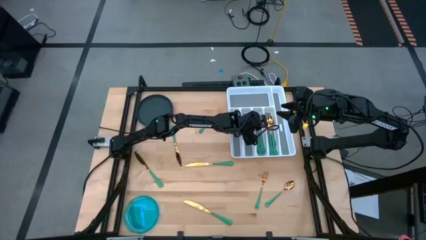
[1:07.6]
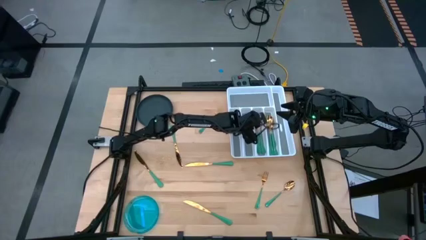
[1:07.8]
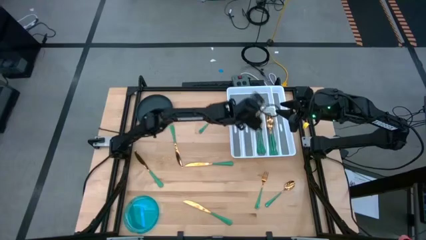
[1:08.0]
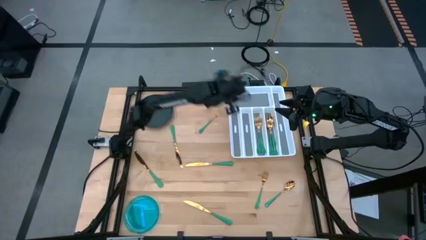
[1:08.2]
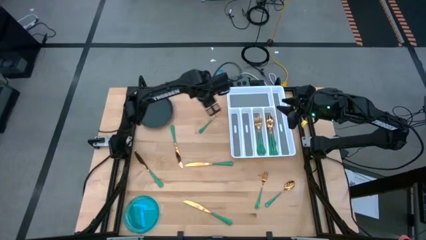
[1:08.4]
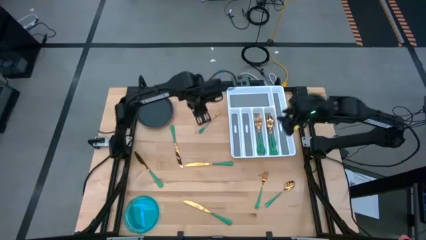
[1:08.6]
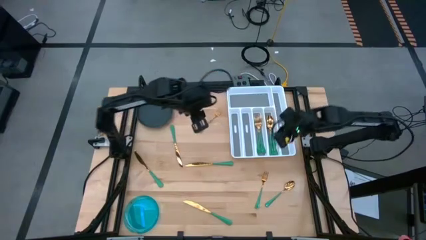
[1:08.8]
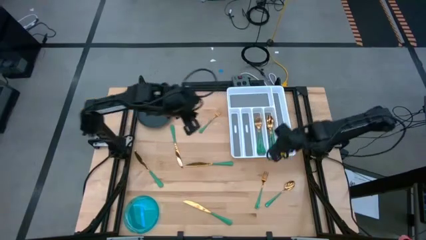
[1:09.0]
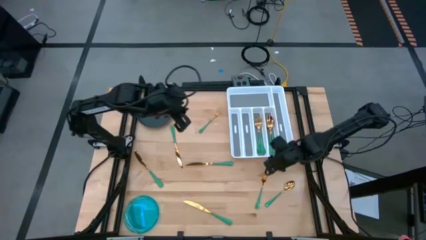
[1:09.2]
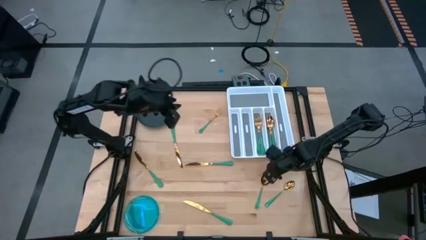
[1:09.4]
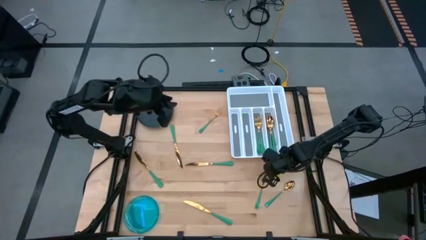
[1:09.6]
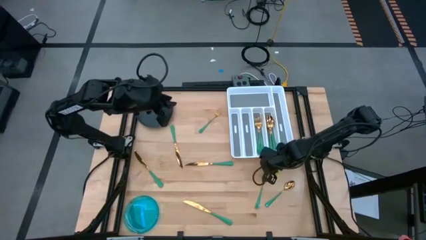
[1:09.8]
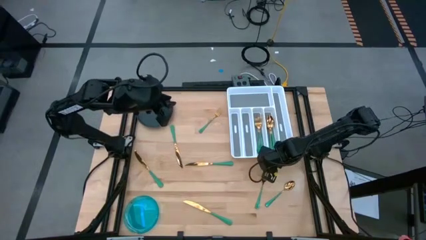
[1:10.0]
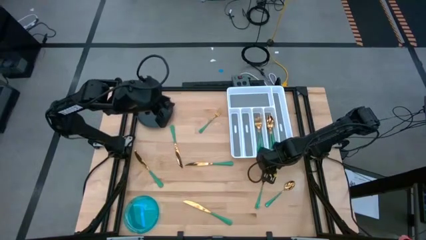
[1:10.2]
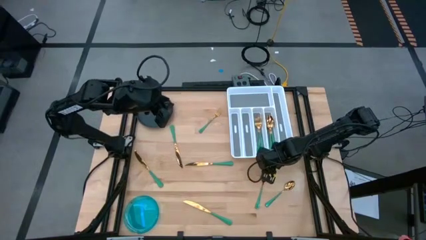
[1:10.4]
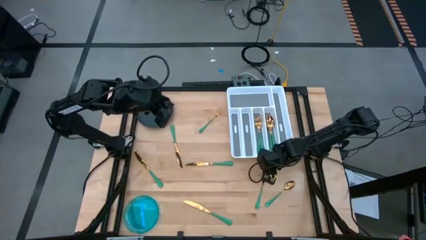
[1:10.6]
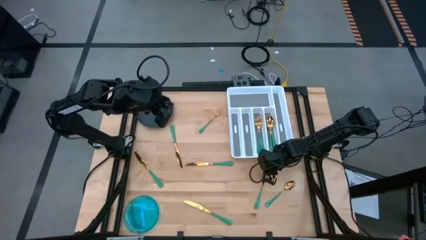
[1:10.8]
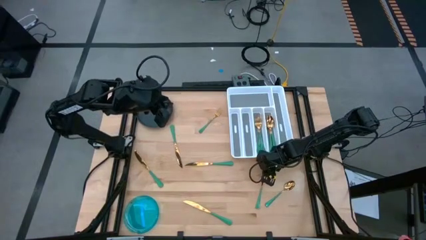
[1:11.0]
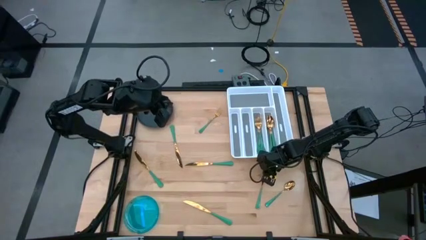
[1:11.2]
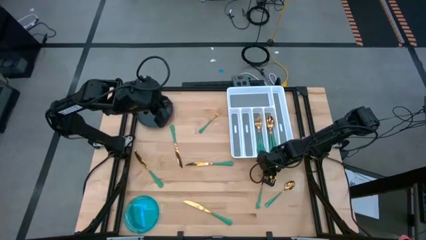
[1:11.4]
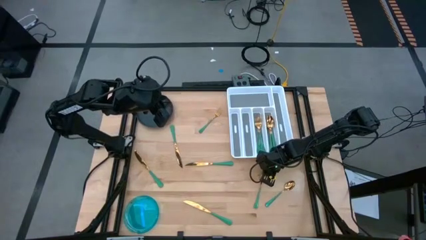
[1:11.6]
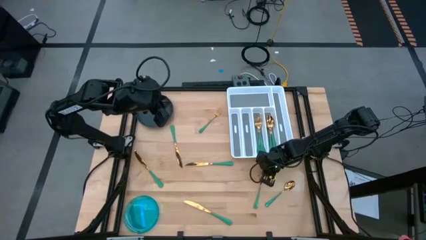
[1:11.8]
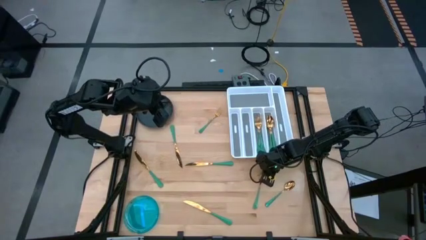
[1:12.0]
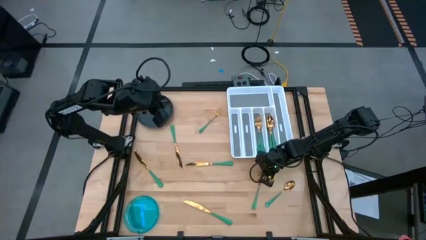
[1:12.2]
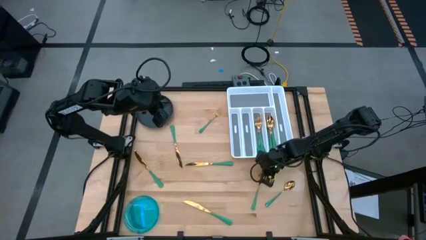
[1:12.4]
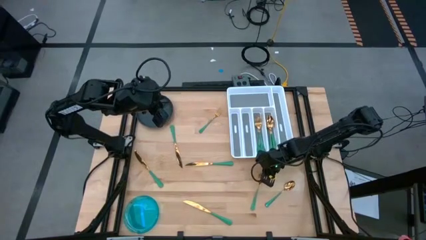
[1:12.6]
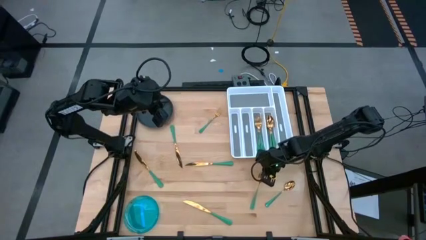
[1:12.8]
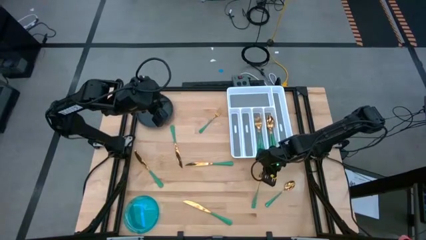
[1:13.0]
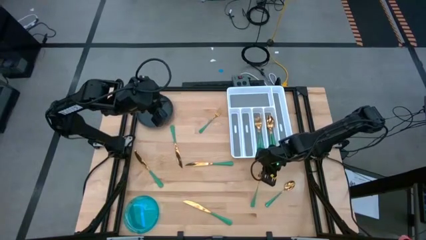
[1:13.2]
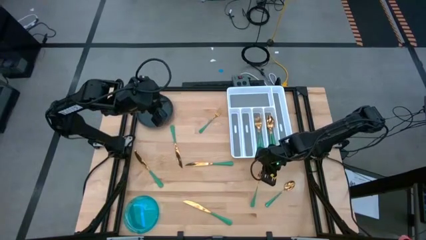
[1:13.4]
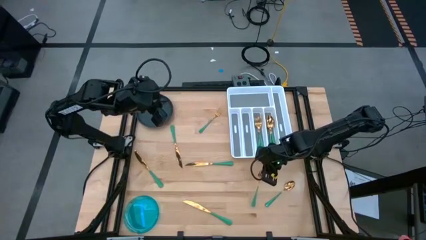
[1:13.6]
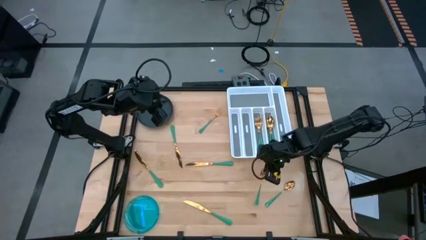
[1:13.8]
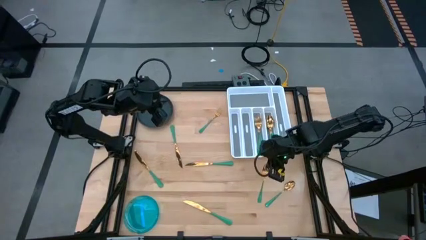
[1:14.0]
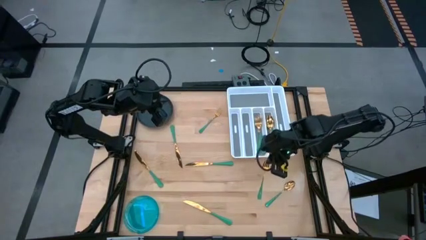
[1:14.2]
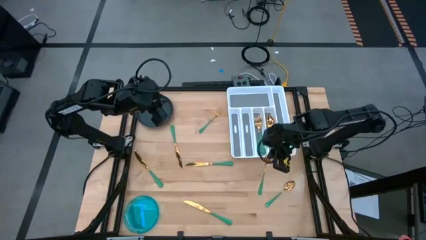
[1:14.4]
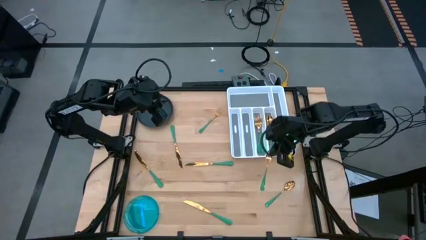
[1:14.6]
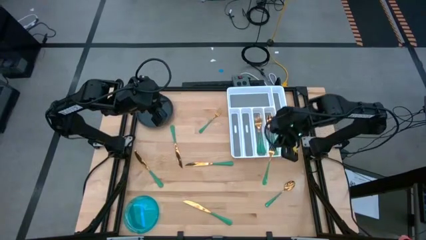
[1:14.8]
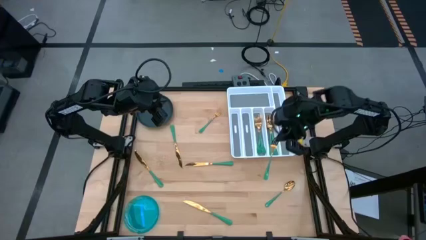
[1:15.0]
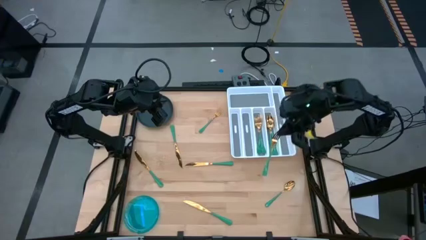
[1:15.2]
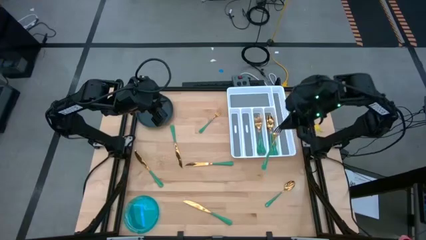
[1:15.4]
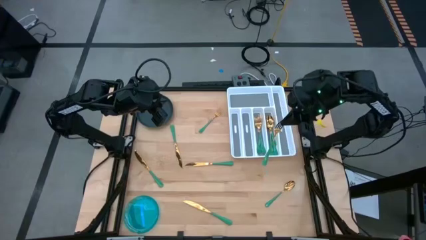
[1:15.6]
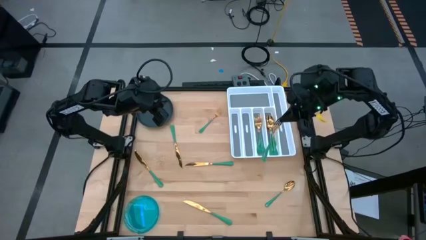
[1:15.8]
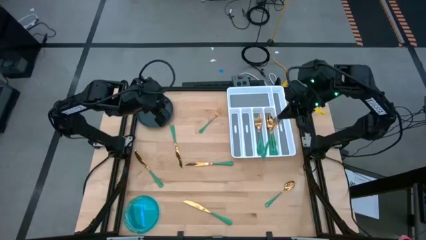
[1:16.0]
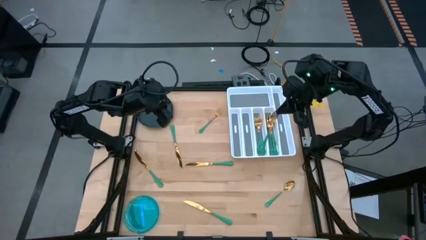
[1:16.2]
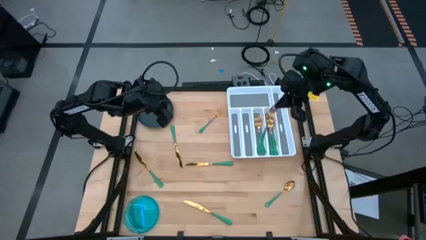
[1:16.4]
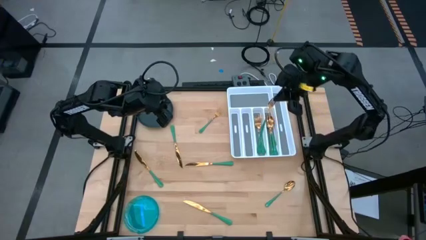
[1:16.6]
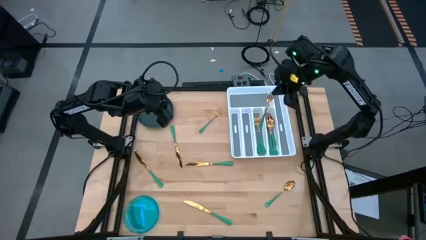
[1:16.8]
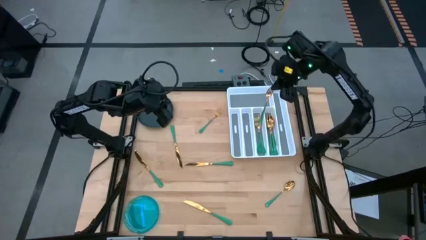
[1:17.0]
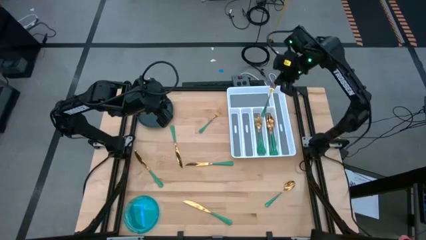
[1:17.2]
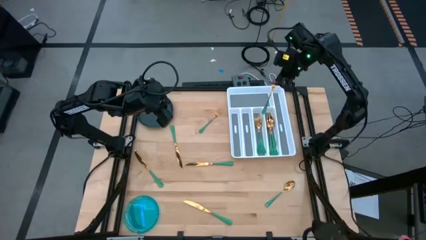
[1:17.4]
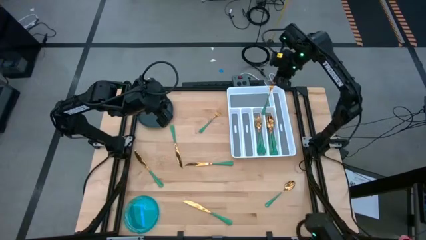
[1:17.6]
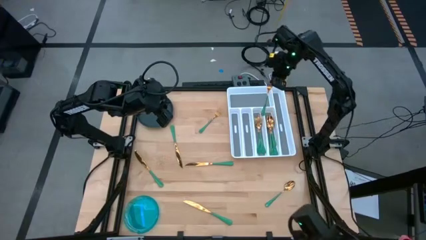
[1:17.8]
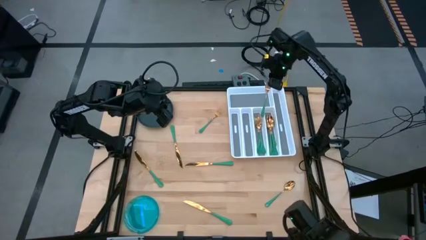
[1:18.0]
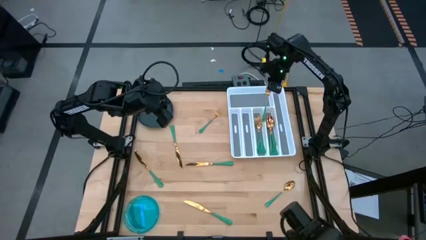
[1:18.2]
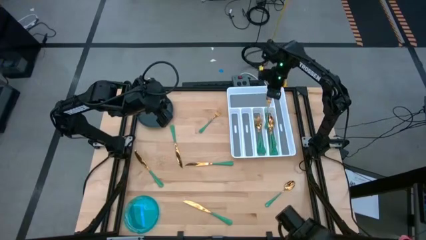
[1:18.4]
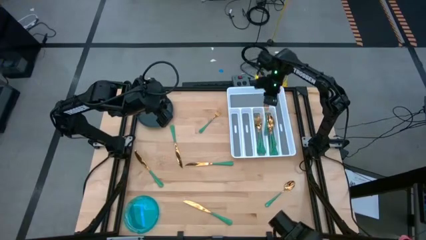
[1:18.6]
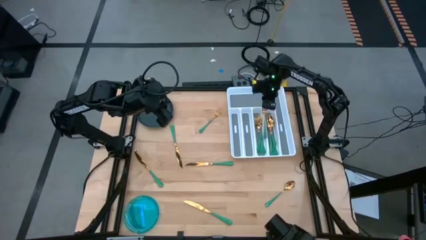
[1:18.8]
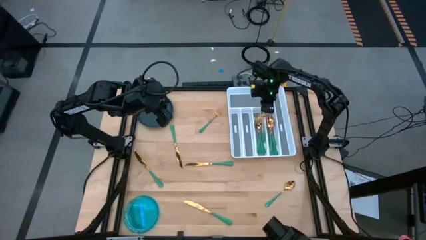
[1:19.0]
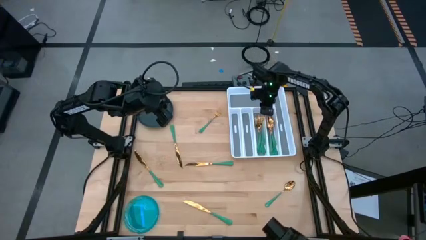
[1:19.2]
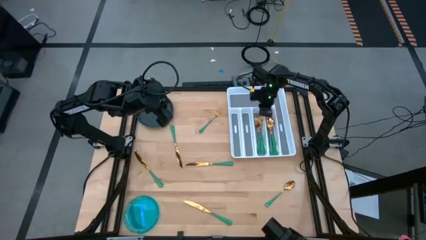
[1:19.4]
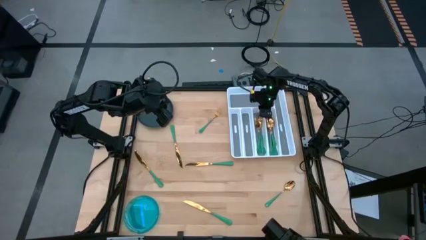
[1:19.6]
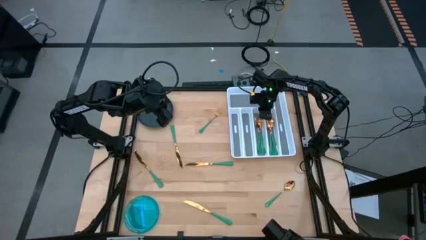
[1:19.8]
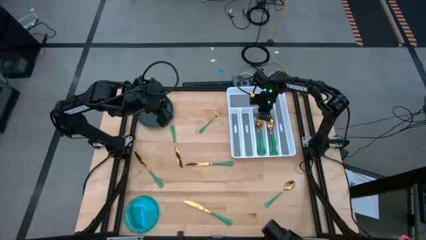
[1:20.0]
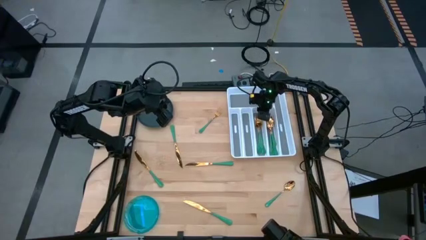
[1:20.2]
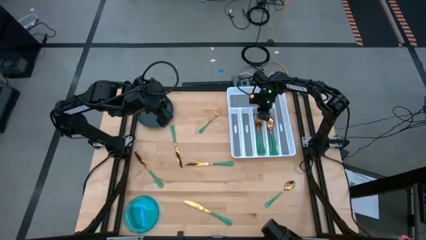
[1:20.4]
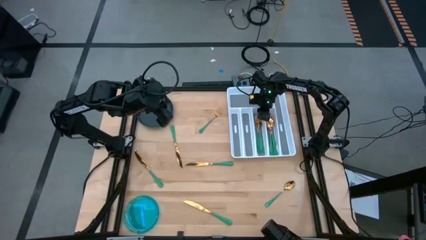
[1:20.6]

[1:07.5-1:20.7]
Task: Sort silverware
Put the green fork into the white silverware organizer

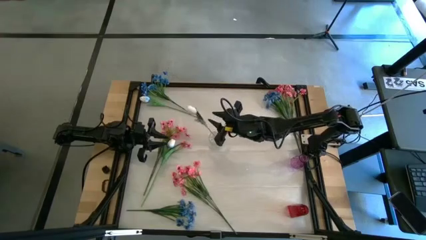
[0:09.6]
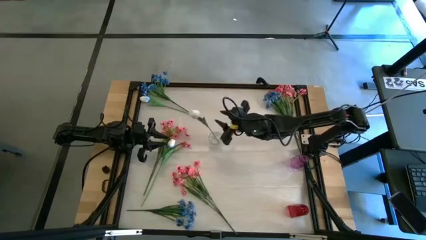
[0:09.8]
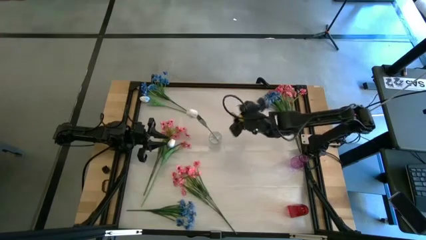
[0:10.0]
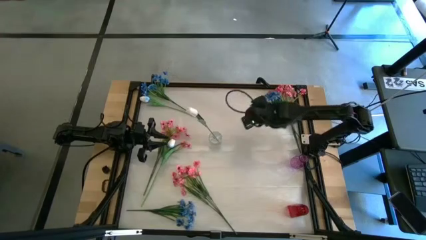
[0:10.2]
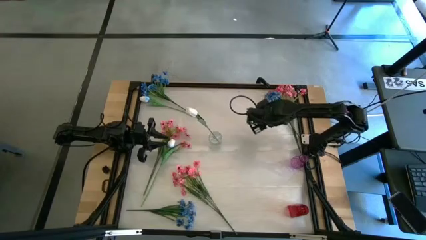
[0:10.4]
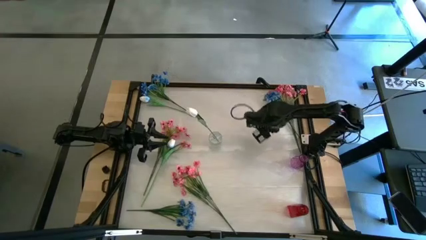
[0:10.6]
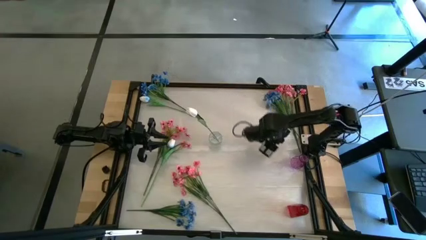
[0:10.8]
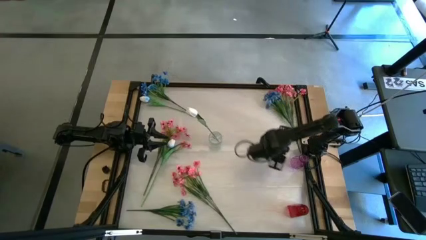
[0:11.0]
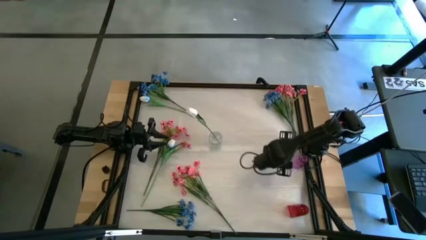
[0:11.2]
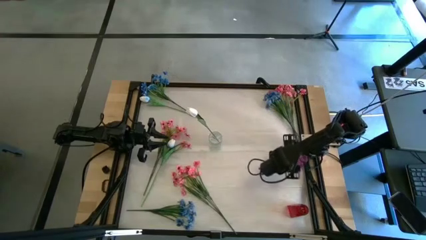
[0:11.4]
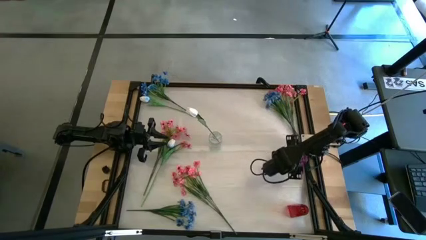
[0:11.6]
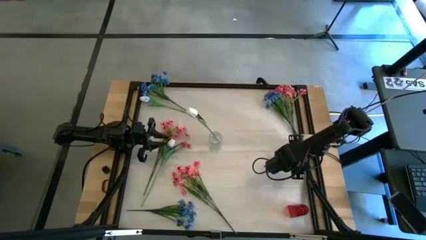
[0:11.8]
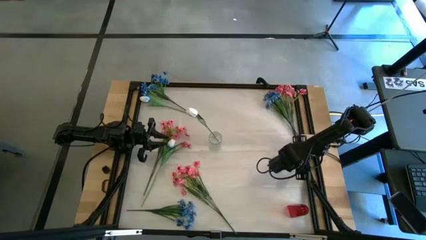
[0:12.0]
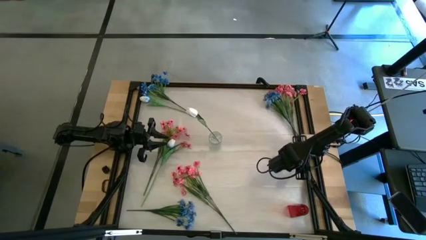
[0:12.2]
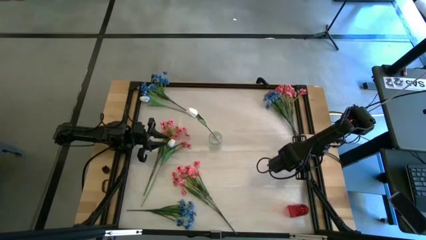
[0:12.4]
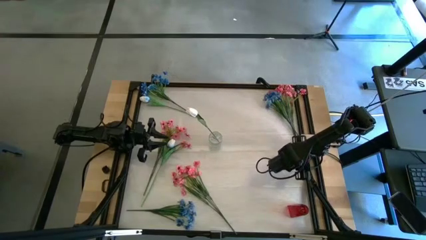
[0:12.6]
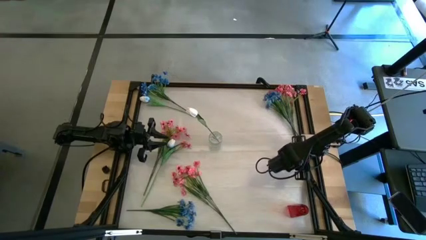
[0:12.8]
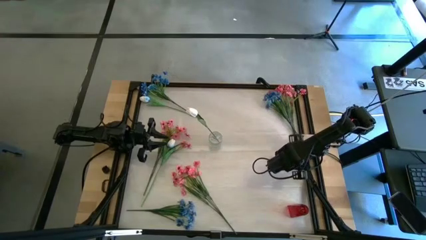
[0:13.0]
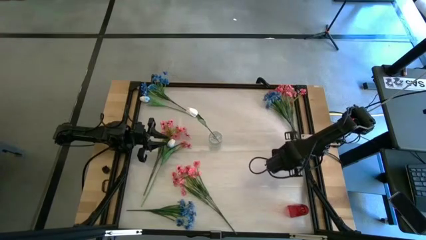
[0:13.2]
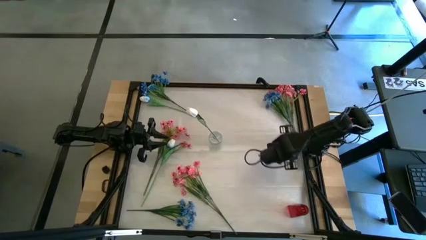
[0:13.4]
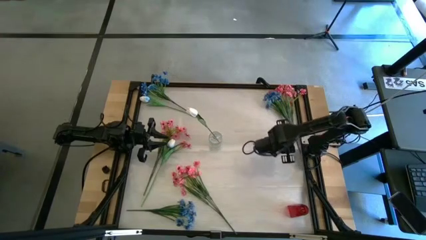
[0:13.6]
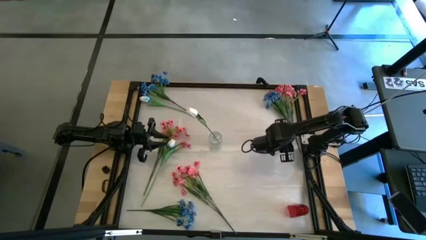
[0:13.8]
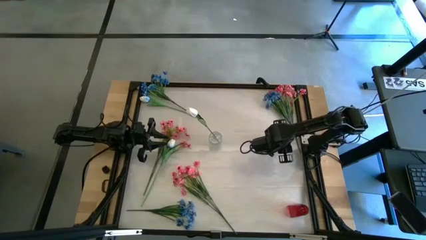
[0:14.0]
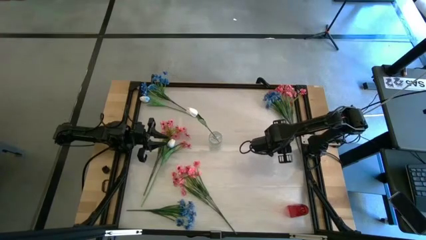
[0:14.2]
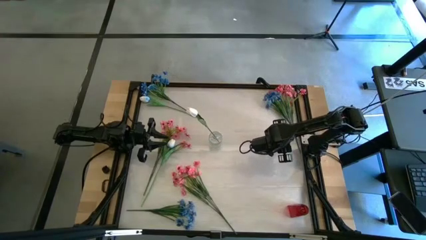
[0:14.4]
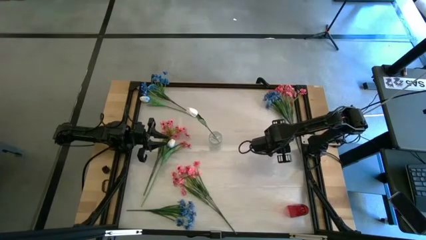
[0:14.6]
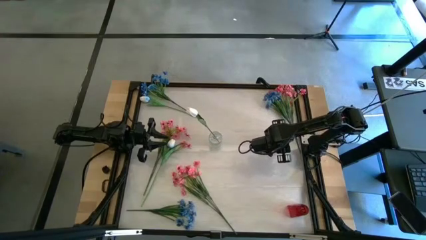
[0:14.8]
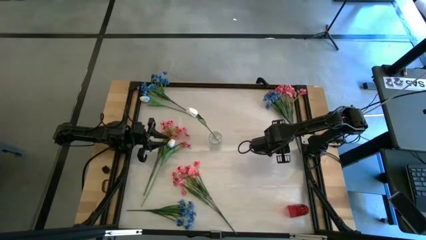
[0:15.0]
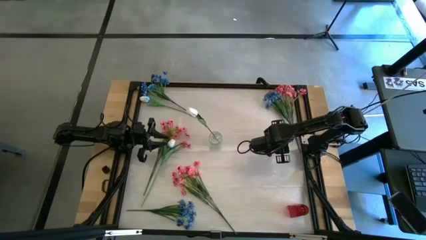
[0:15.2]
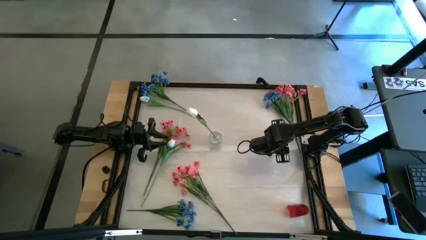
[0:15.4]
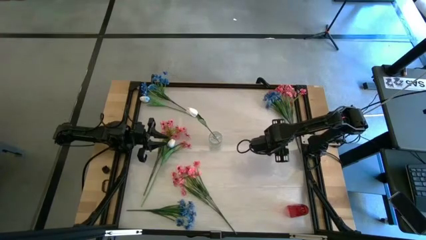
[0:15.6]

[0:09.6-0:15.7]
Task: Sort flowers into vase by color
Adjust the purple vase
